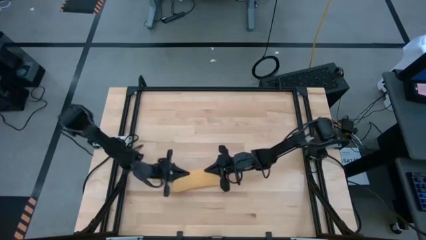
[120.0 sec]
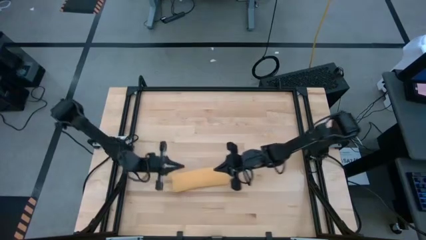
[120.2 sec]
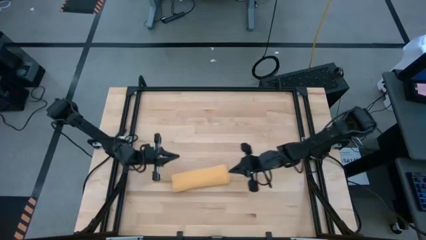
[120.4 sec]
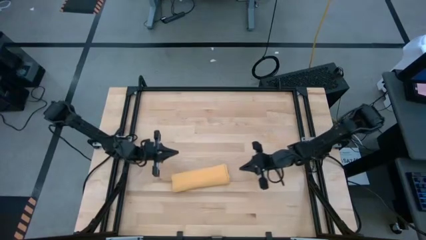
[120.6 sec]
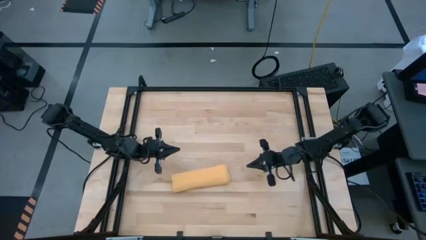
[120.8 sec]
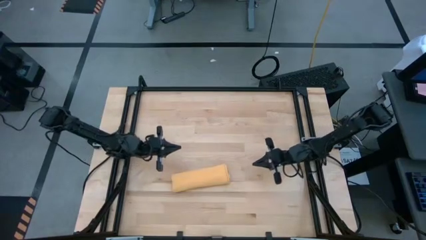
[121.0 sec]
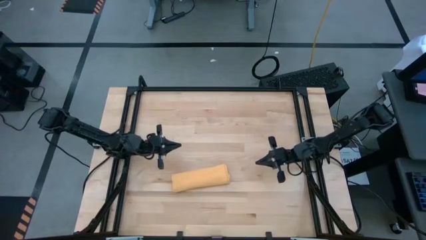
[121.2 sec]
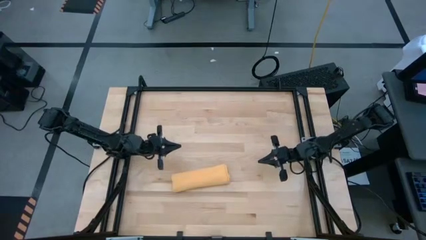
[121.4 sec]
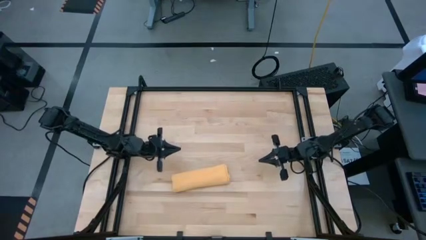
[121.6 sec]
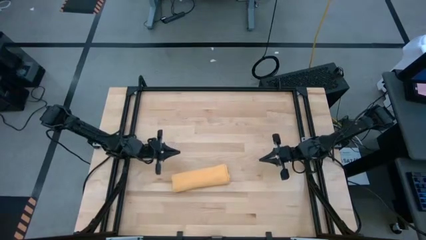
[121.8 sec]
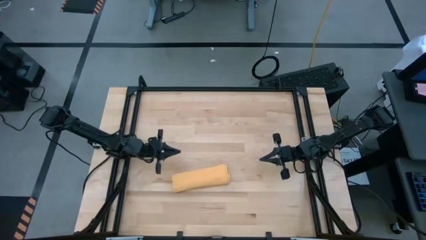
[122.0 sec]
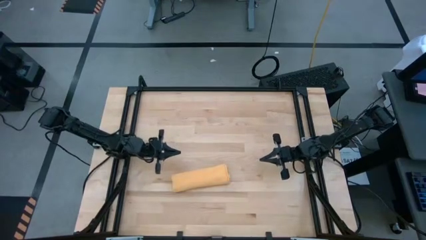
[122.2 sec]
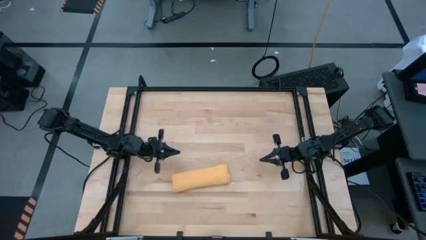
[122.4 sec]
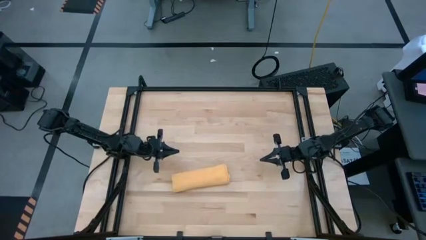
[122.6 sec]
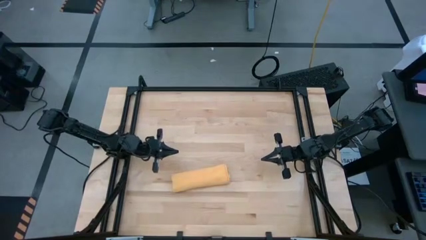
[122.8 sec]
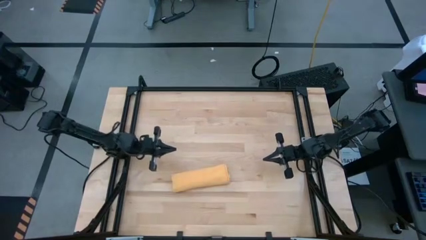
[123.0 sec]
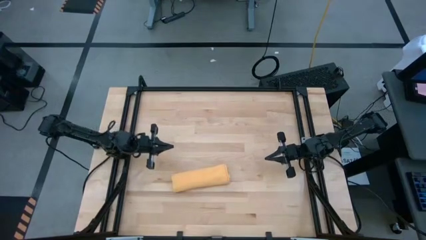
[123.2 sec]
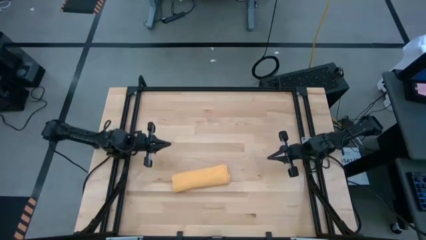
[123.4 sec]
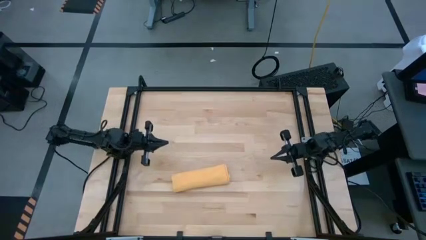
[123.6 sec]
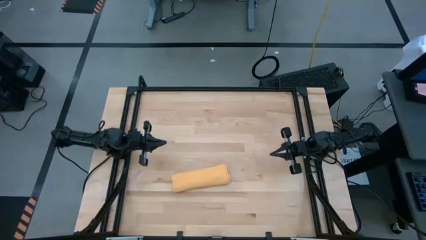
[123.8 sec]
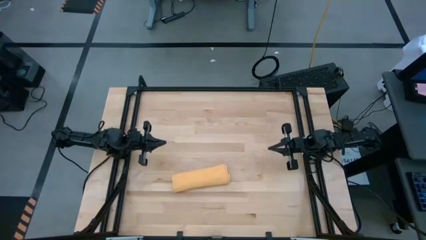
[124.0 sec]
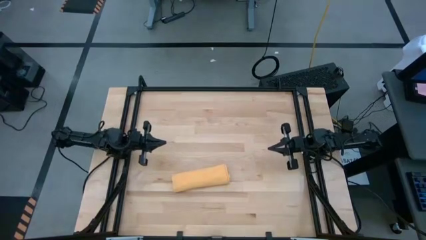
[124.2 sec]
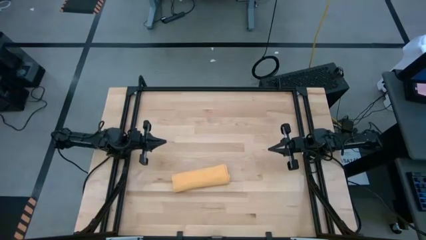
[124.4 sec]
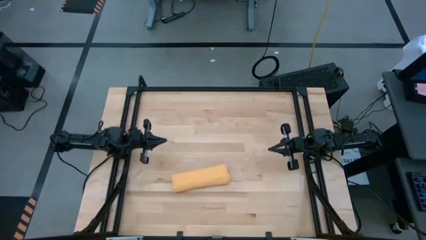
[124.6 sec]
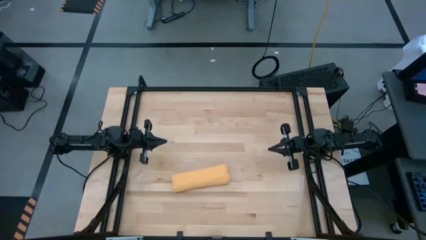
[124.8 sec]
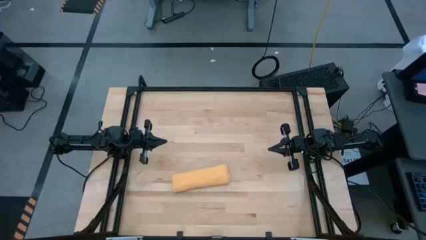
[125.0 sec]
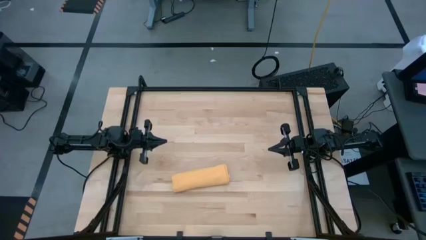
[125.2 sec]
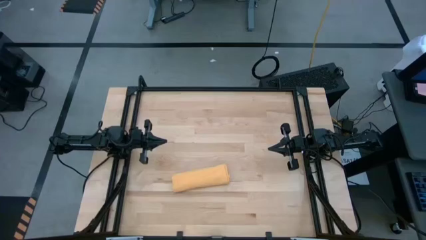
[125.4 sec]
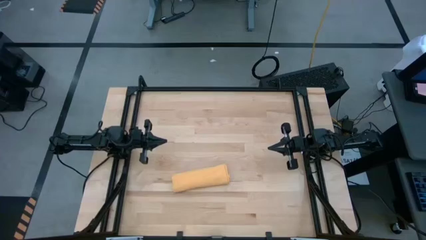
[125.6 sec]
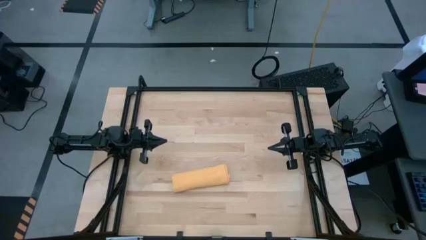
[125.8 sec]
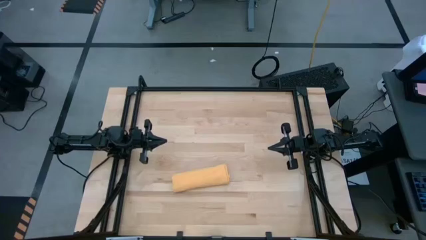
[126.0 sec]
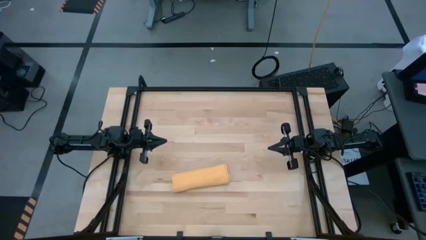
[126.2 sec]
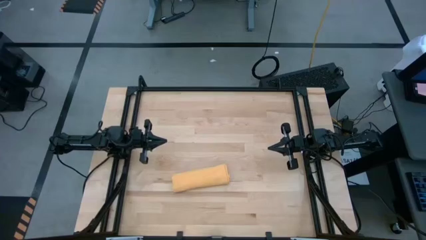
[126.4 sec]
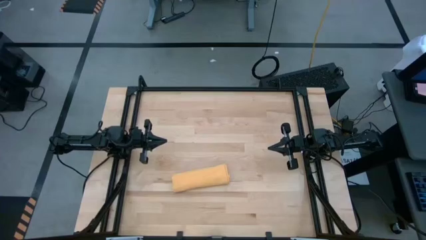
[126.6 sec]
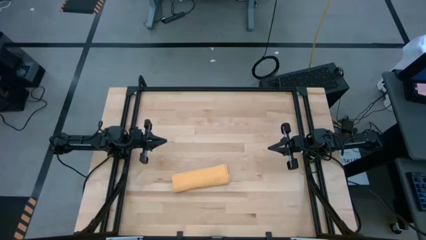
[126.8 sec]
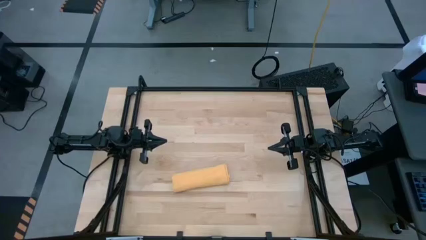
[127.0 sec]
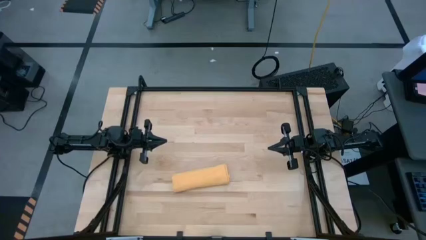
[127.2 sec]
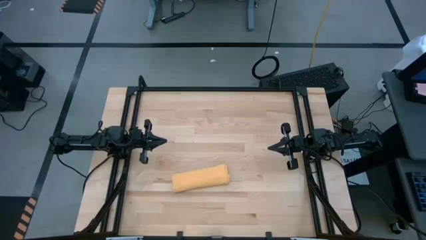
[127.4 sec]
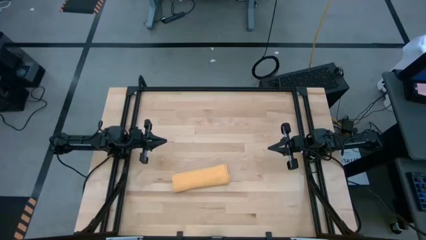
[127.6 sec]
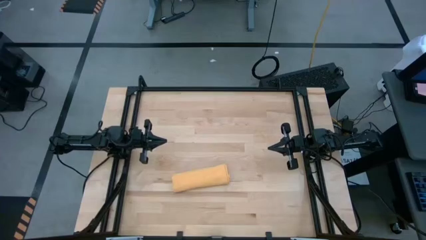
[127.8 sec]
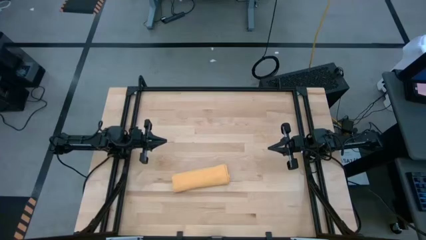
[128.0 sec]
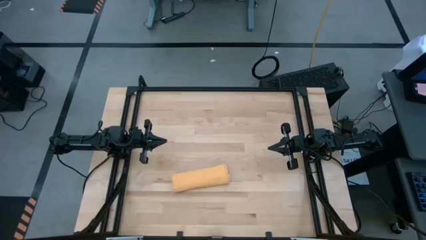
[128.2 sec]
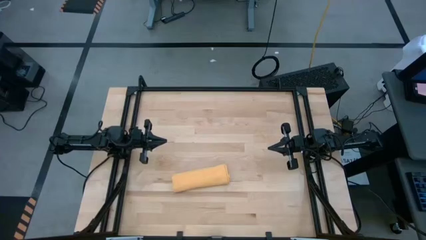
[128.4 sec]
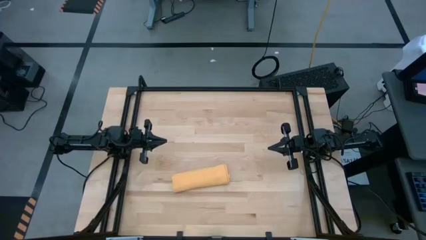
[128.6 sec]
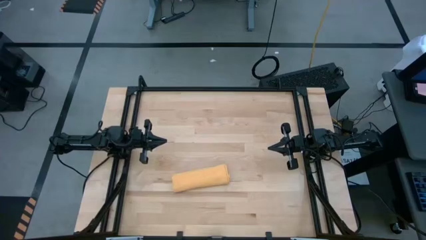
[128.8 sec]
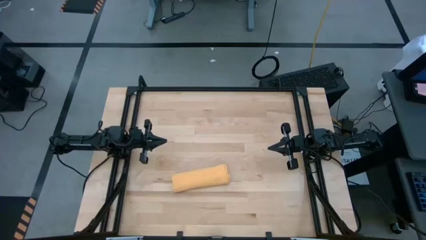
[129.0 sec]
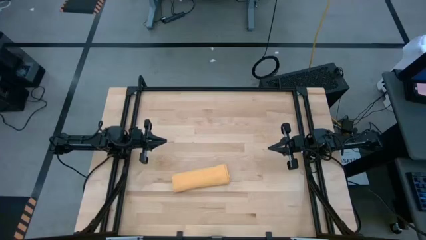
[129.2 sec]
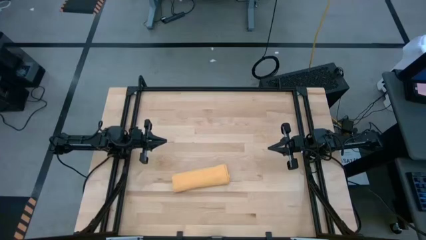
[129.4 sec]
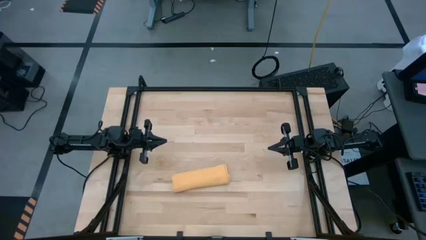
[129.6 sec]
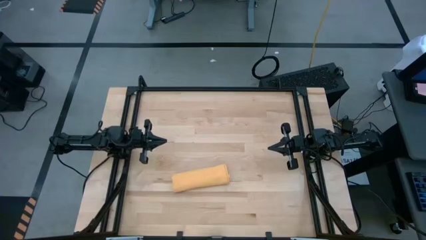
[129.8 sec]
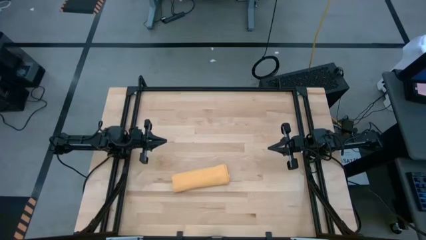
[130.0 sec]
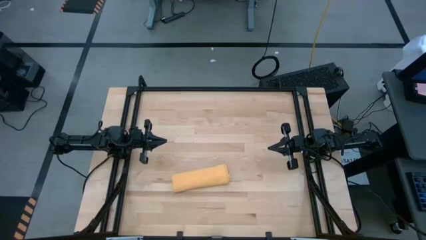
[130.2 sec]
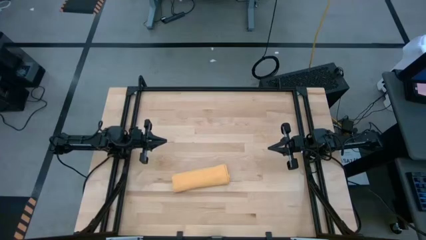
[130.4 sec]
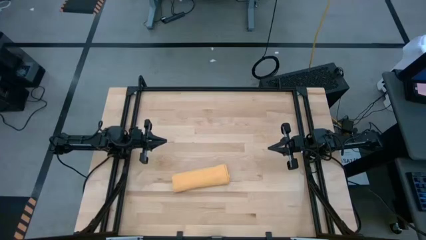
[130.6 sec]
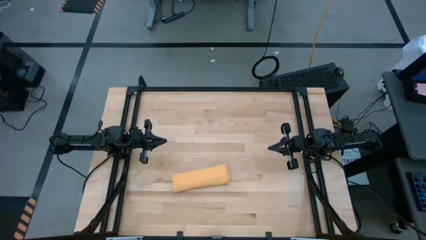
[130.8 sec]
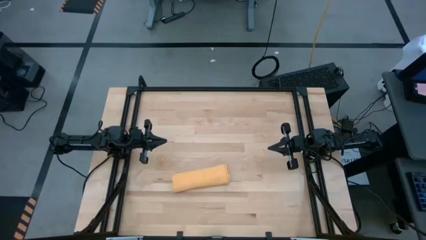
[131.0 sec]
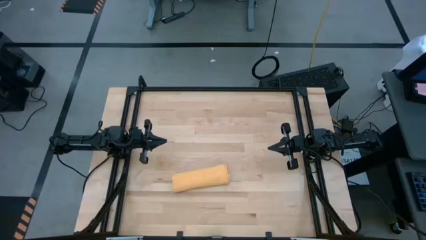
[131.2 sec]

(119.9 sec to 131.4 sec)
Task: Roll towel
Return to Home Position

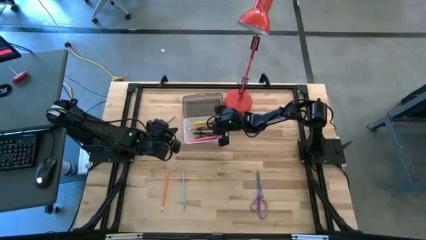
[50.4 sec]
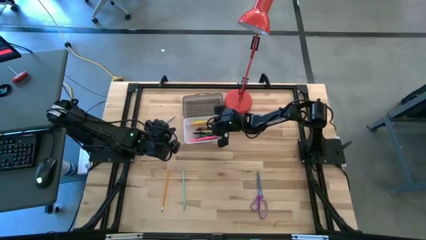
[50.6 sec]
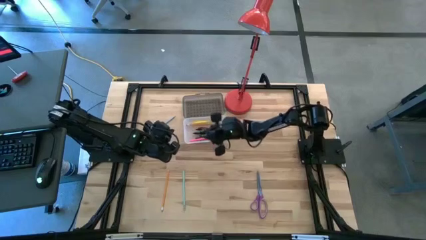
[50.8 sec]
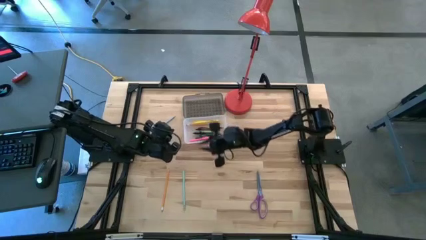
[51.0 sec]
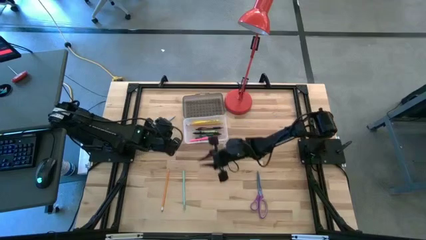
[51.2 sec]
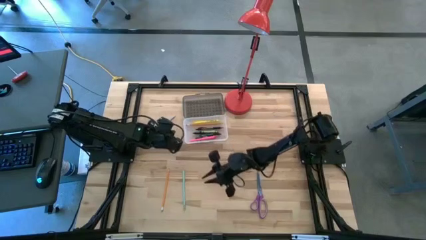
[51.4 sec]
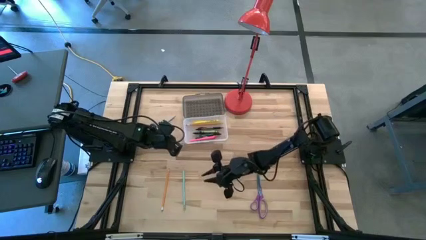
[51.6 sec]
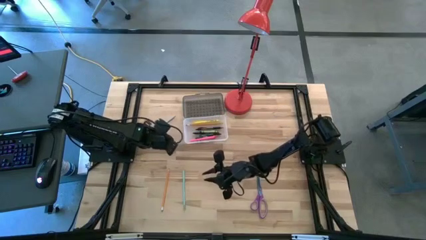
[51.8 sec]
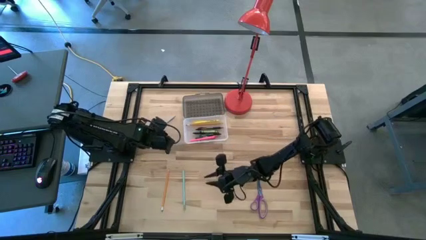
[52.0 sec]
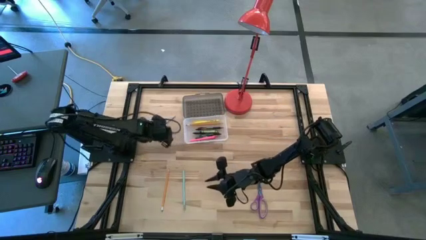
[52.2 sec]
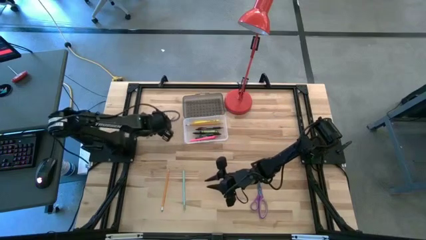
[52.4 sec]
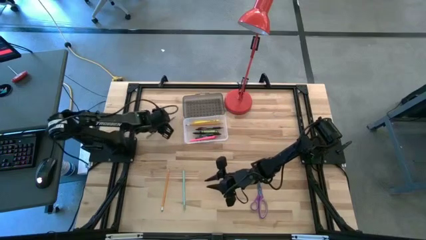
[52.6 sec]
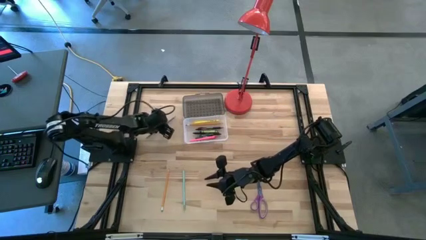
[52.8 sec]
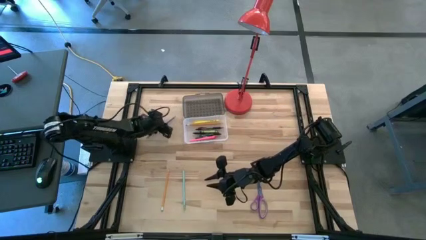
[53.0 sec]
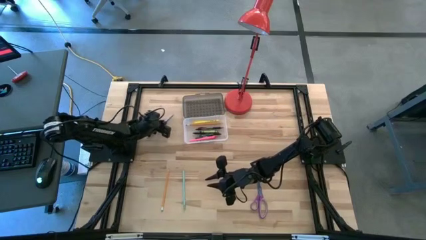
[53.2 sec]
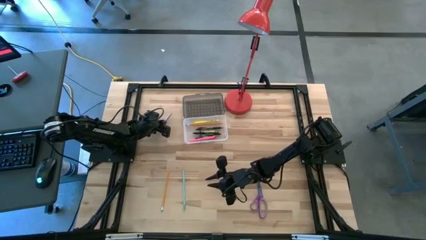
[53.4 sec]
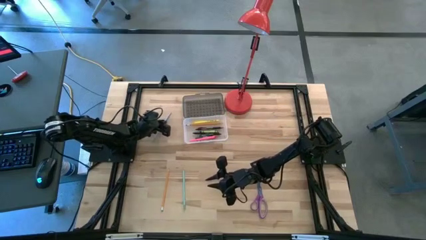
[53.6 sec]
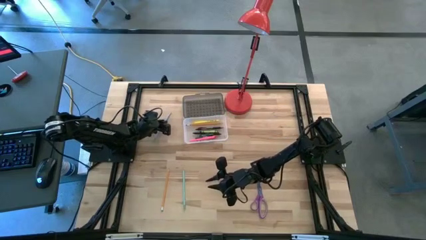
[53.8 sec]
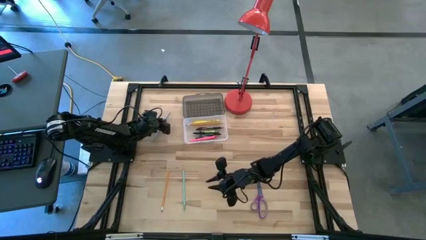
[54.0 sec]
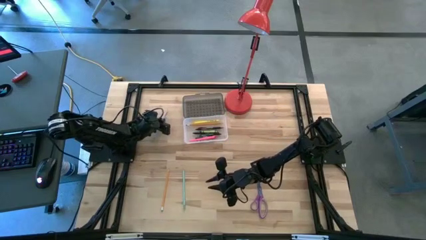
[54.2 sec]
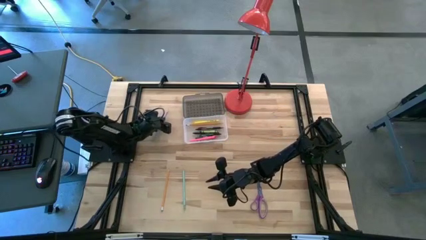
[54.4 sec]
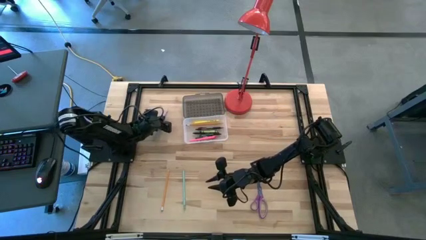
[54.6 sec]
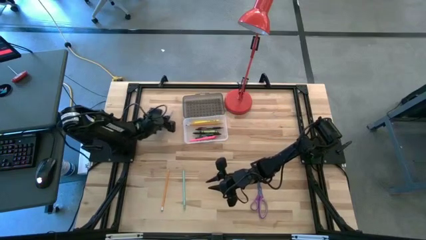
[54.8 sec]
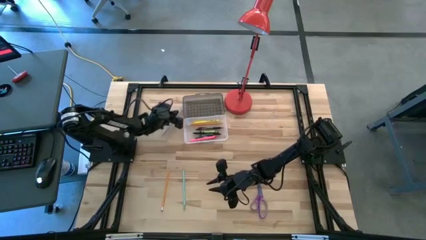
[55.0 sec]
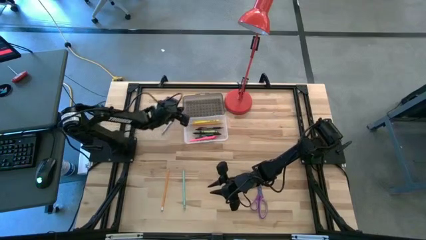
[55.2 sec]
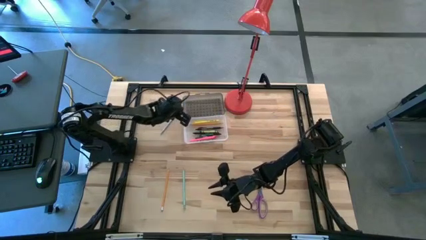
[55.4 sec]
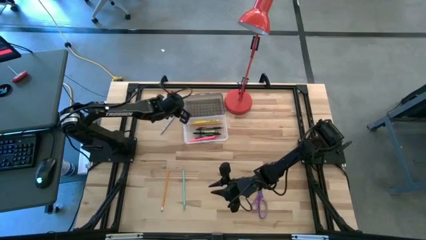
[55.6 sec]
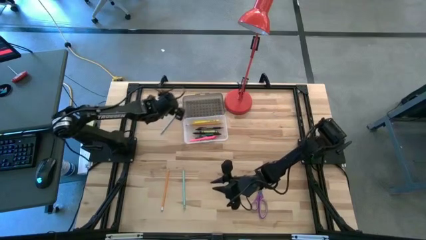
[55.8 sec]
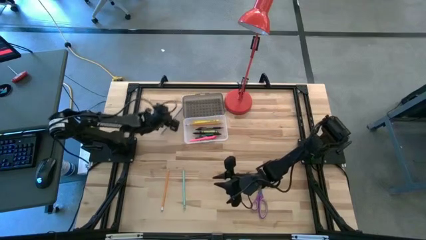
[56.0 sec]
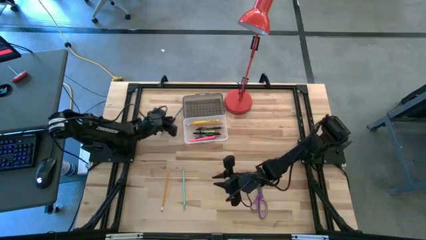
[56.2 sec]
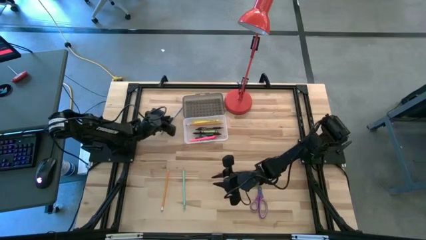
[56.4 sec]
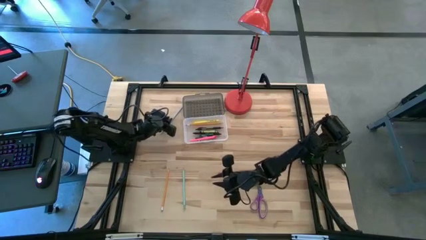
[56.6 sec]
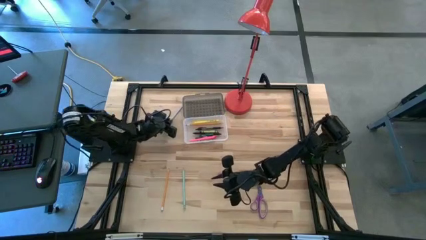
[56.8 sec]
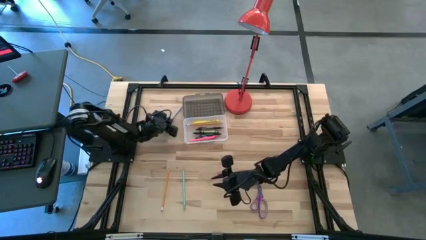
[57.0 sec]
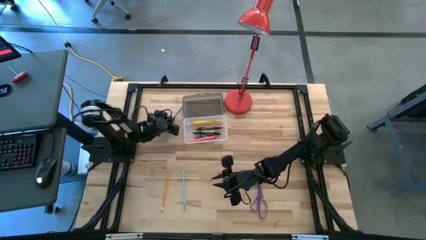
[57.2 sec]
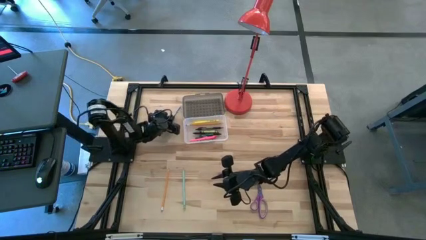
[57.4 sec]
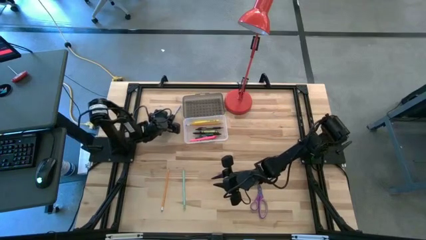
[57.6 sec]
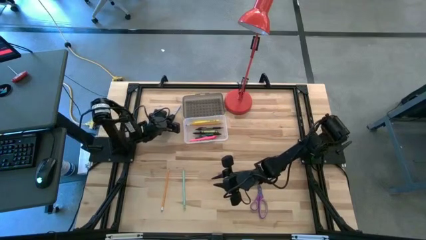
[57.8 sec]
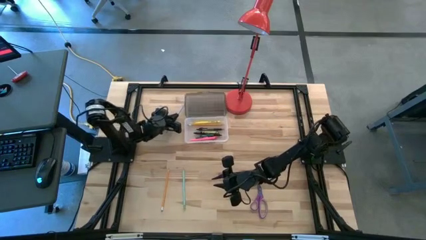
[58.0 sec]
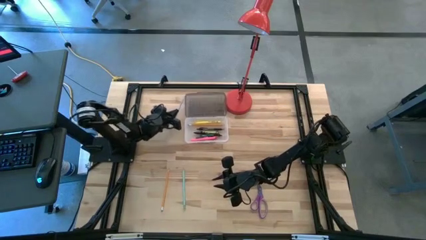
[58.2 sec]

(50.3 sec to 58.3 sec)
Task: Pick & place school supplies into a supply box
Put the blue pencil into the black supply box
